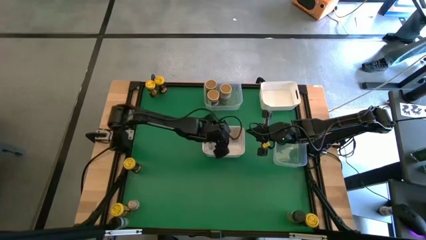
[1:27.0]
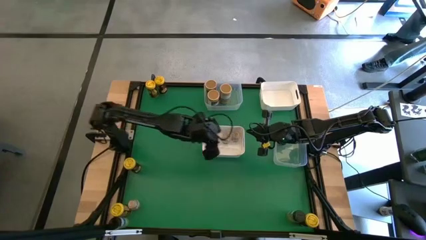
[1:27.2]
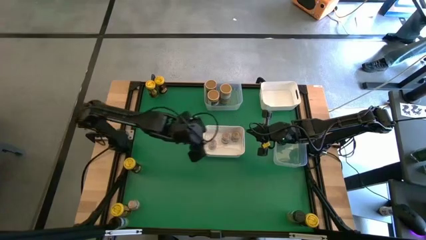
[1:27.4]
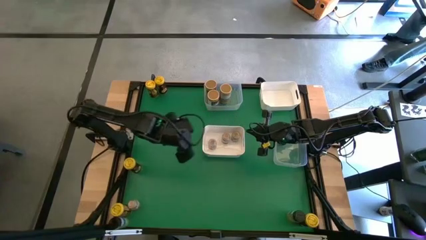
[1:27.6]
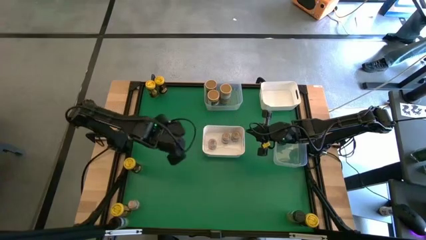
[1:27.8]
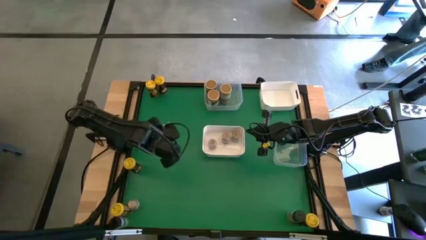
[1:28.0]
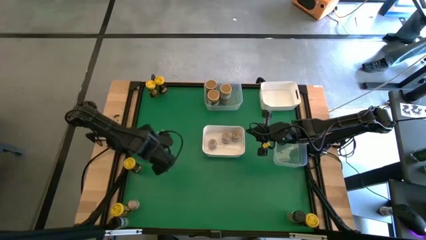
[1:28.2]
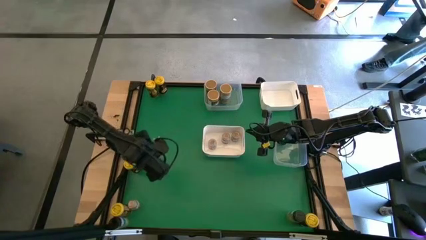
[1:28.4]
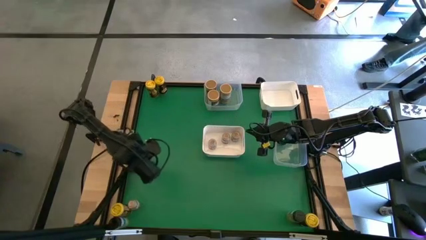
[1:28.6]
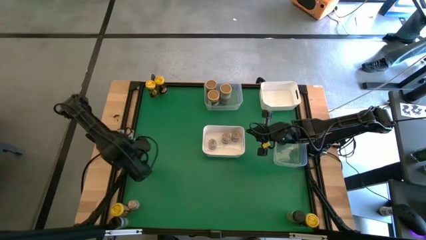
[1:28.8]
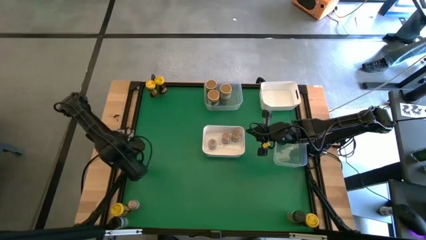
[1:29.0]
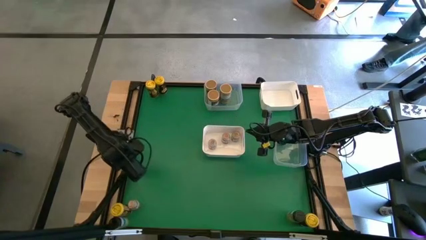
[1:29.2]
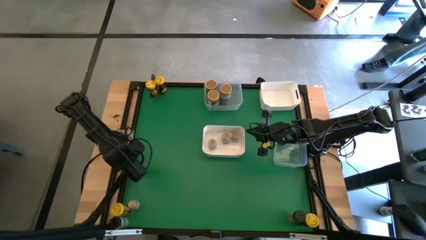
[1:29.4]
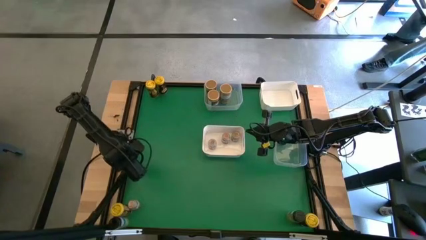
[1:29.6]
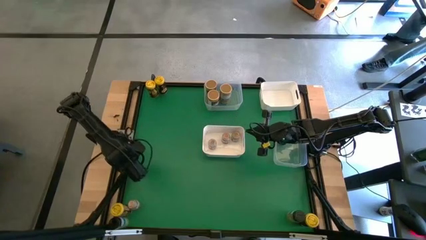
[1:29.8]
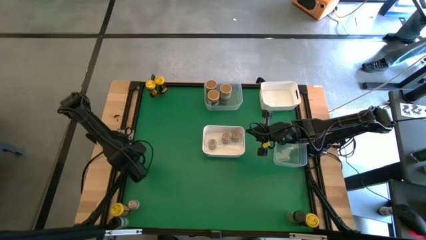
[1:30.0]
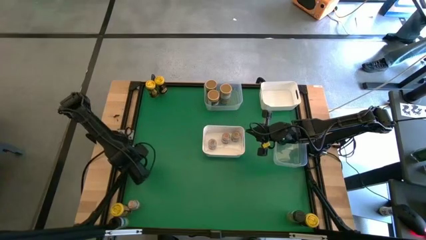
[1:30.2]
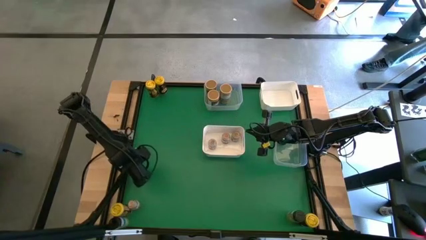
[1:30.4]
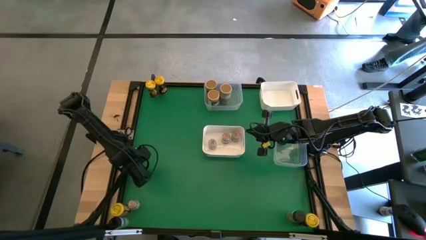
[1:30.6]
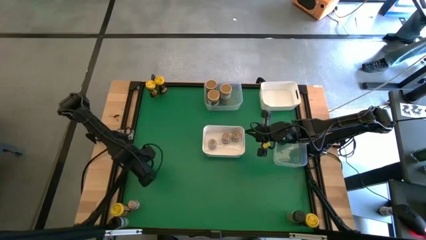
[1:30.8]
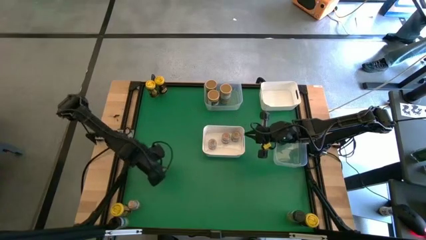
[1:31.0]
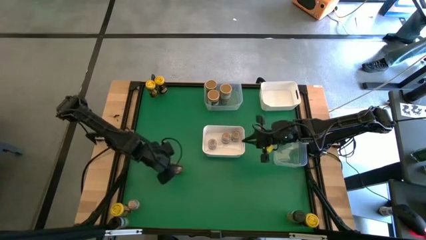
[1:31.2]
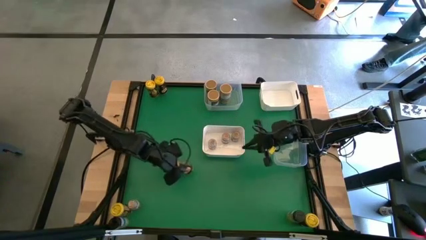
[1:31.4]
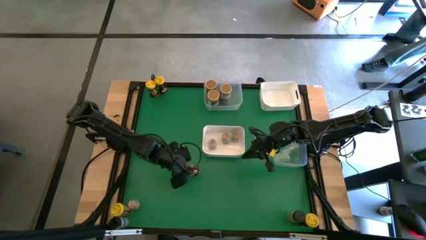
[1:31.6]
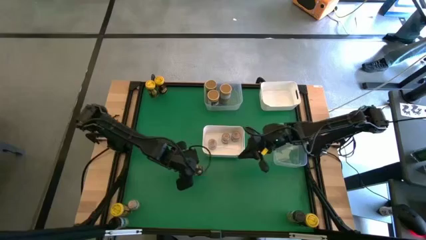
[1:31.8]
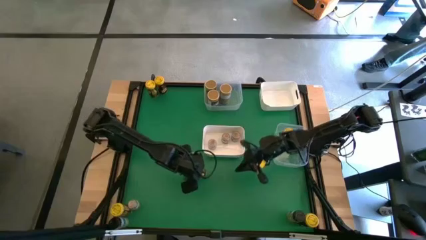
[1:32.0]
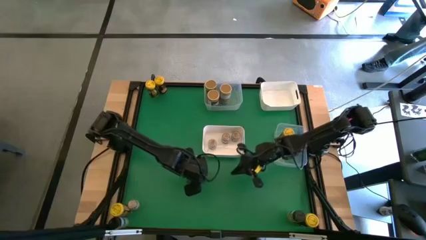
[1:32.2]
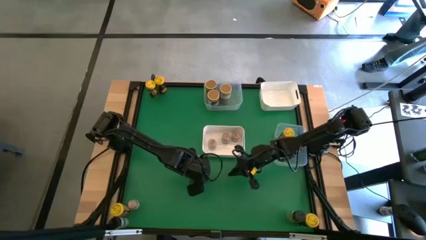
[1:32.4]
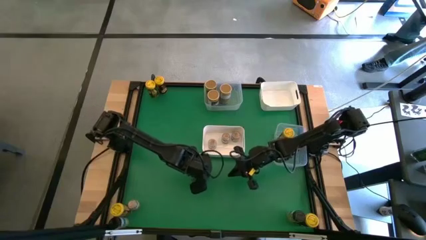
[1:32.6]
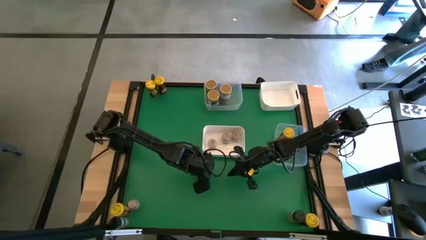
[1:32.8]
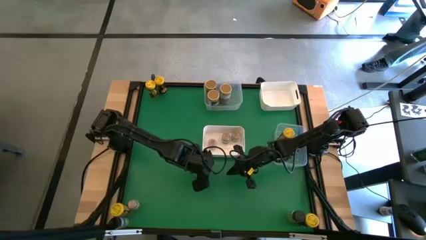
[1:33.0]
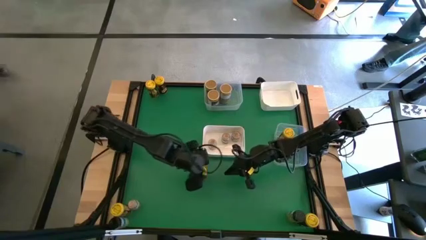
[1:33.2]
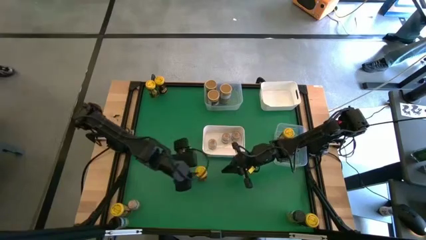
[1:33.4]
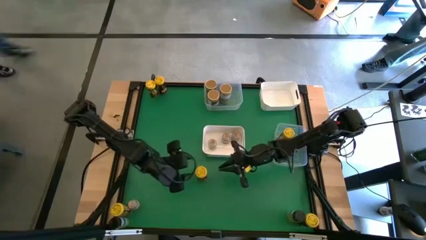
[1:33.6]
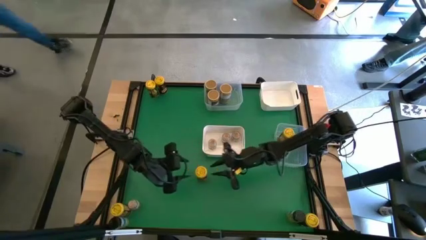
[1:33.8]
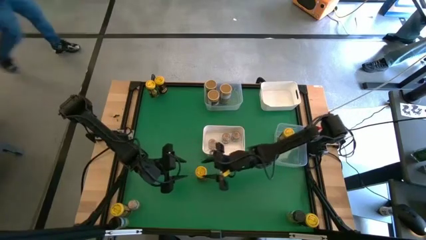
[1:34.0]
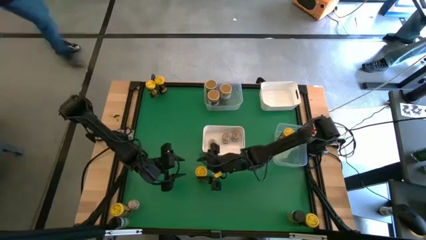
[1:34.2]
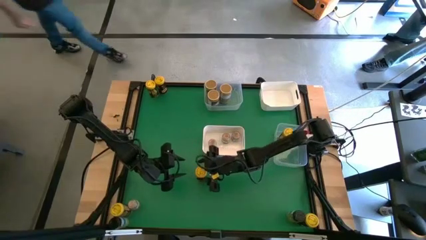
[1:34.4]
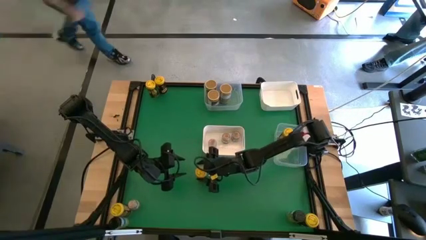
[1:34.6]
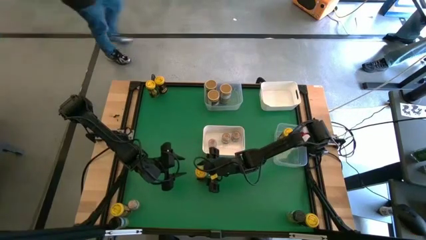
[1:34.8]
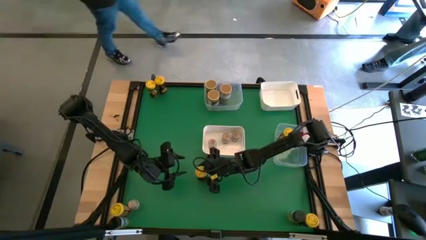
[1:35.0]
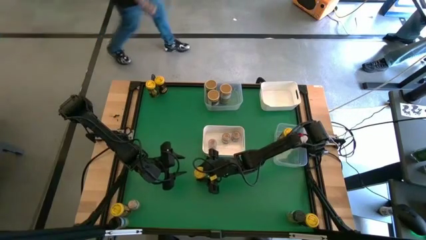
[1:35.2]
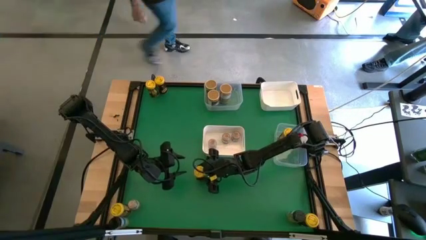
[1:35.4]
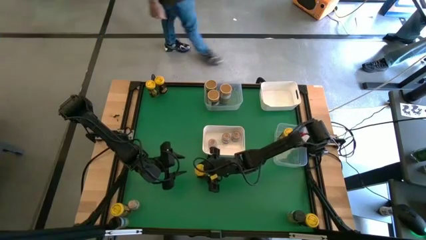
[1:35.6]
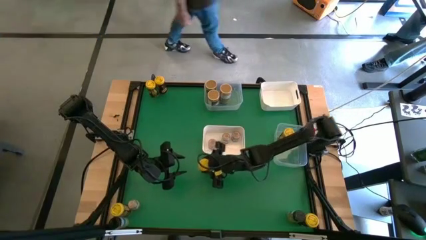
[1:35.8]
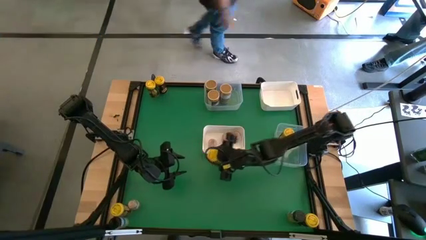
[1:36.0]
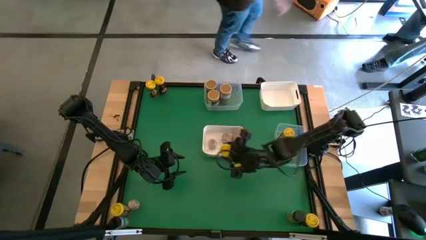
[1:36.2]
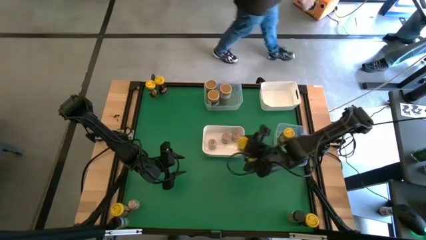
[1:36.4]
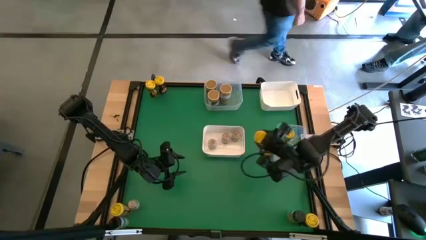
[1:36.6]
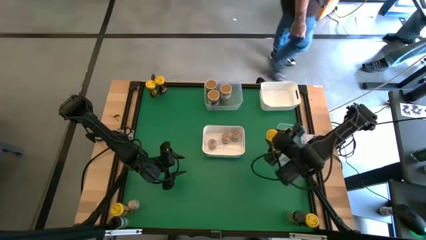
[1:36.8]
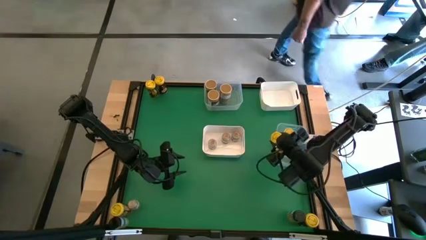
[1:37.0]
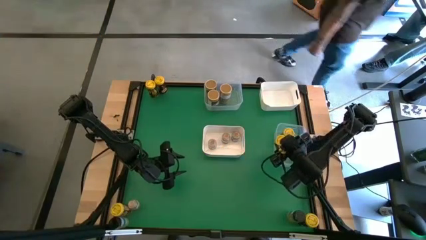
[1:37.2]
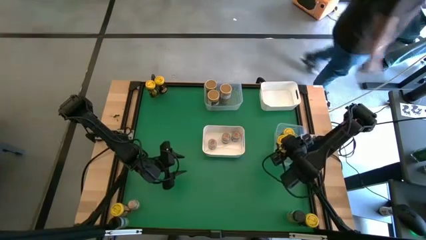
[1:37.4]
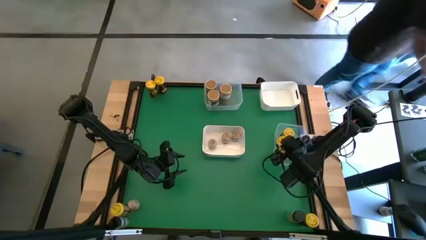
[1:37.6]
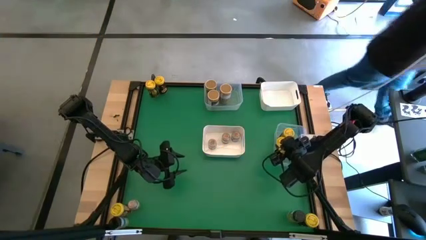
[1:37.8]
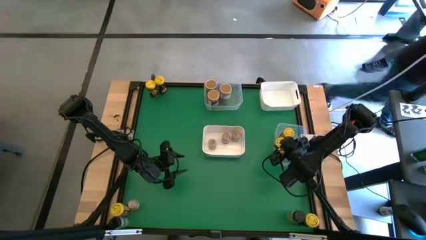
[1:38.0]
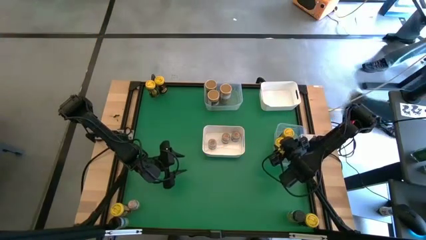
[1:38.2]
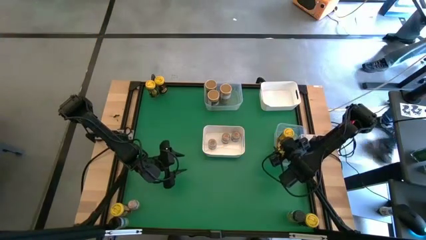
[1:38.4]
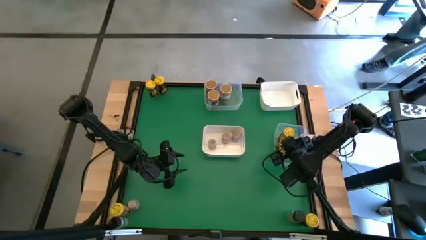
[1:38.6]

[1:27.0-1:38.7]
Task: Sort spices by type
Put the yellow seasoning can into the bottom white bin
